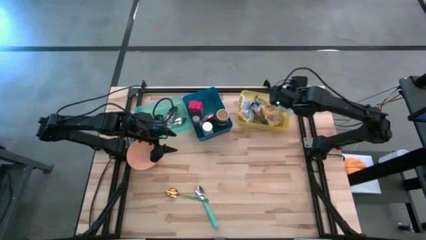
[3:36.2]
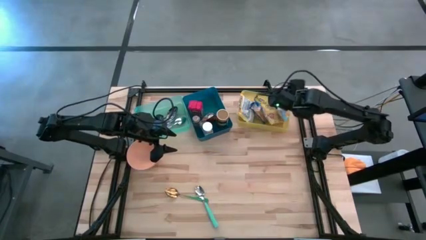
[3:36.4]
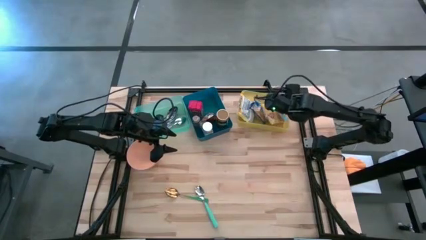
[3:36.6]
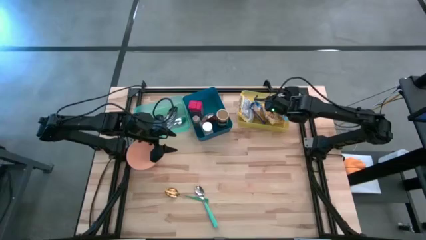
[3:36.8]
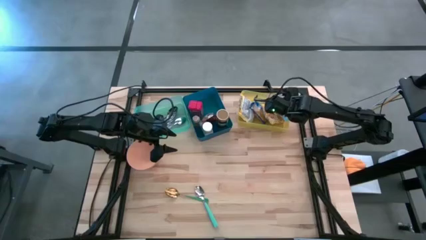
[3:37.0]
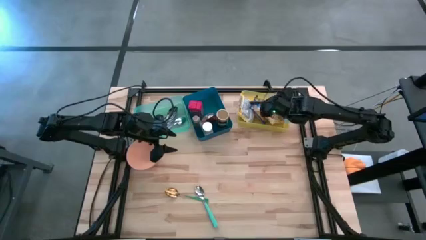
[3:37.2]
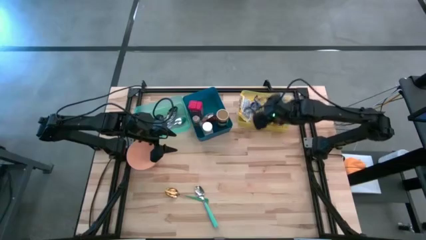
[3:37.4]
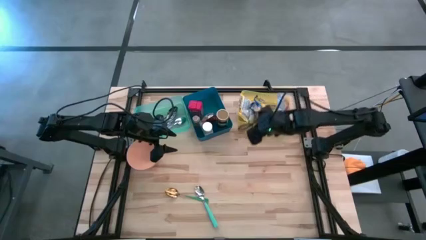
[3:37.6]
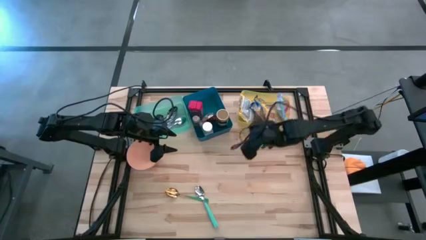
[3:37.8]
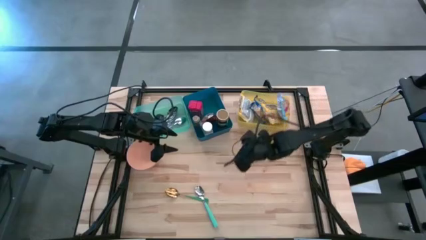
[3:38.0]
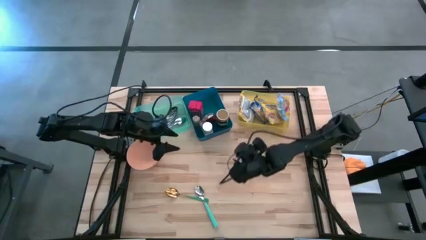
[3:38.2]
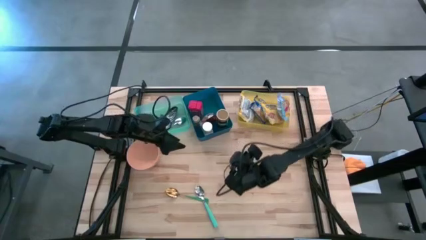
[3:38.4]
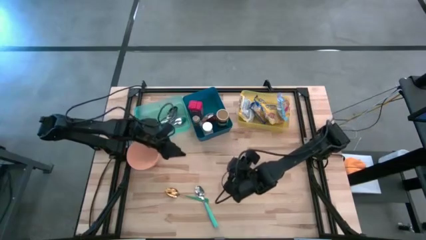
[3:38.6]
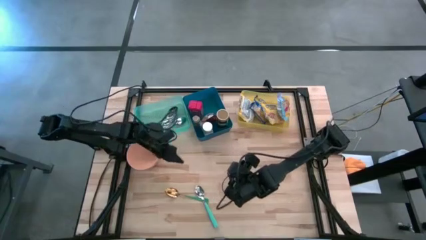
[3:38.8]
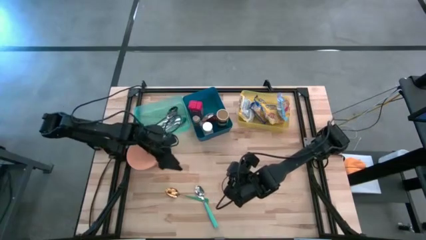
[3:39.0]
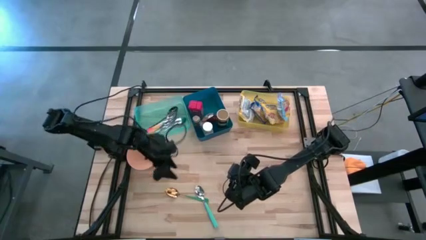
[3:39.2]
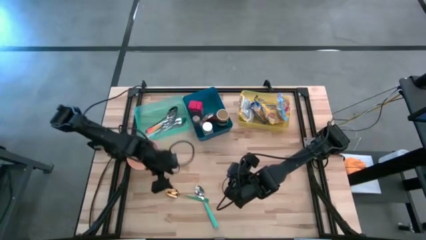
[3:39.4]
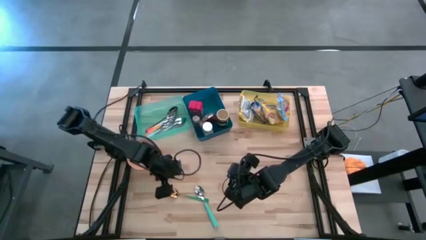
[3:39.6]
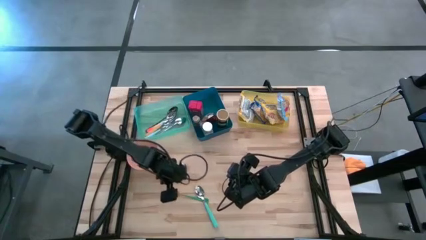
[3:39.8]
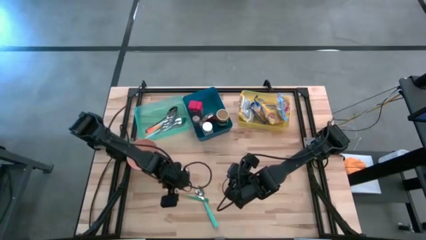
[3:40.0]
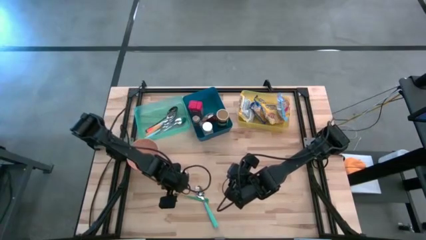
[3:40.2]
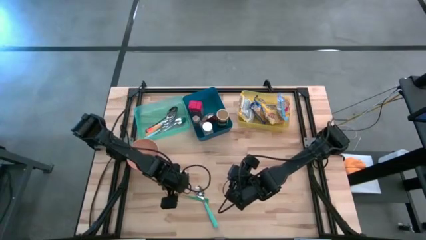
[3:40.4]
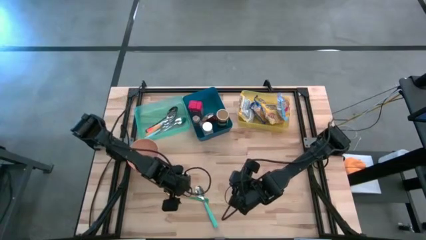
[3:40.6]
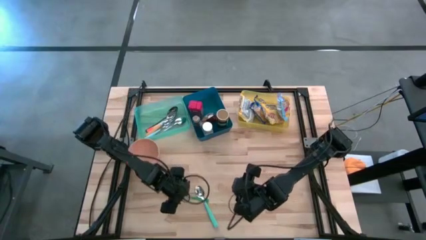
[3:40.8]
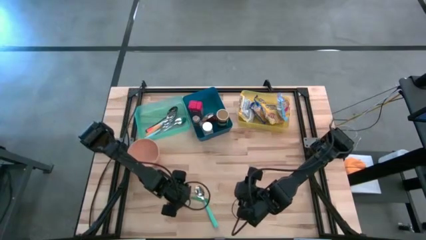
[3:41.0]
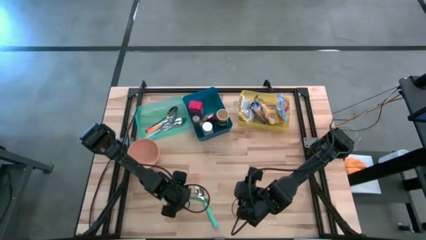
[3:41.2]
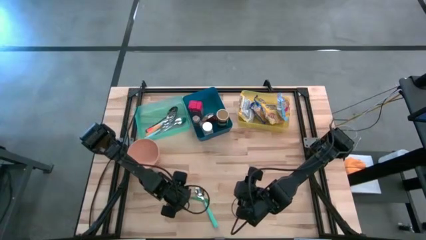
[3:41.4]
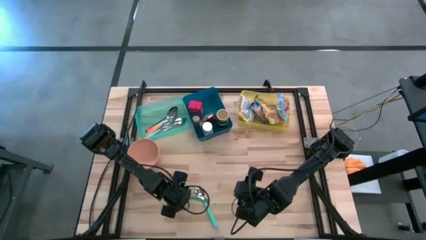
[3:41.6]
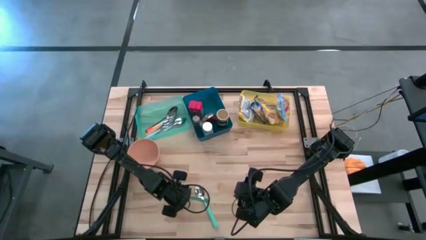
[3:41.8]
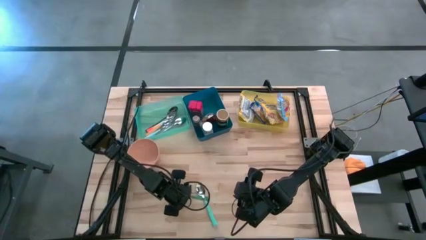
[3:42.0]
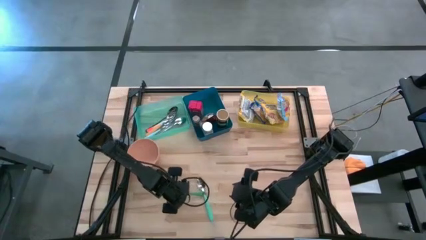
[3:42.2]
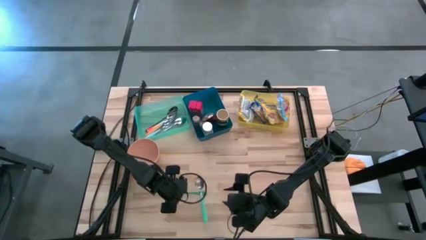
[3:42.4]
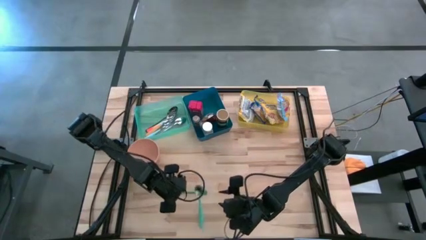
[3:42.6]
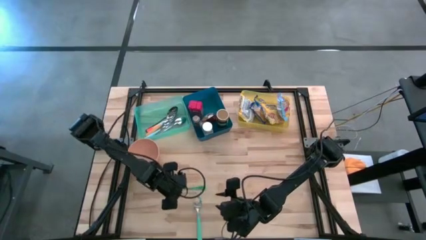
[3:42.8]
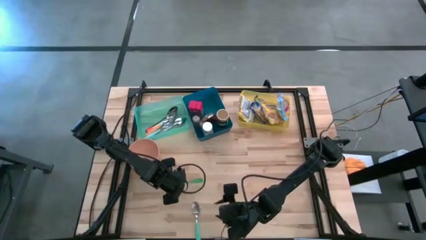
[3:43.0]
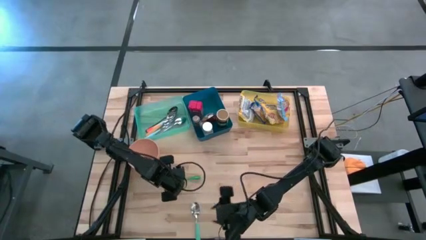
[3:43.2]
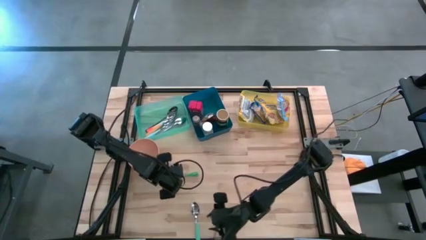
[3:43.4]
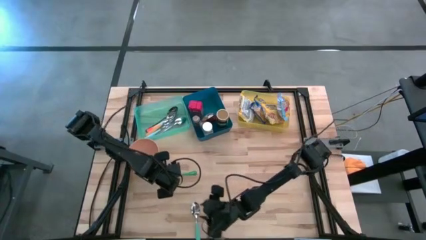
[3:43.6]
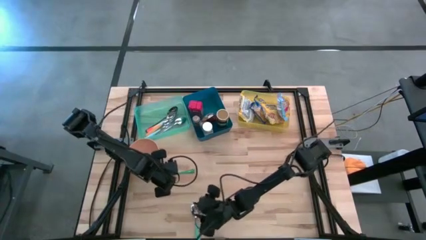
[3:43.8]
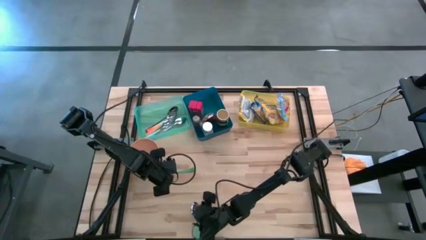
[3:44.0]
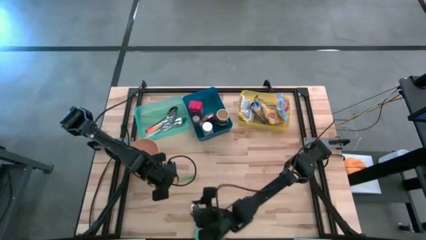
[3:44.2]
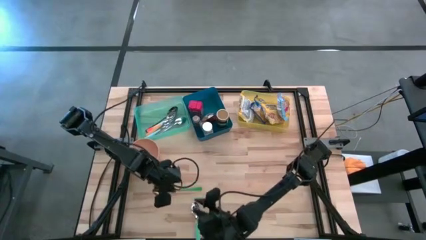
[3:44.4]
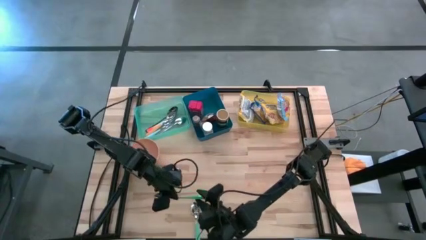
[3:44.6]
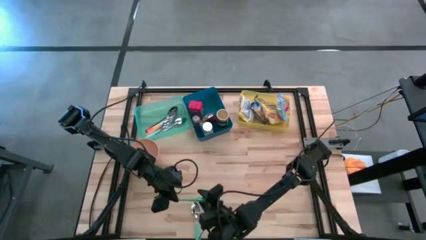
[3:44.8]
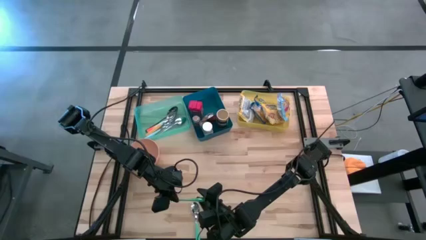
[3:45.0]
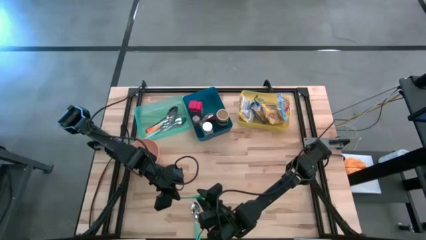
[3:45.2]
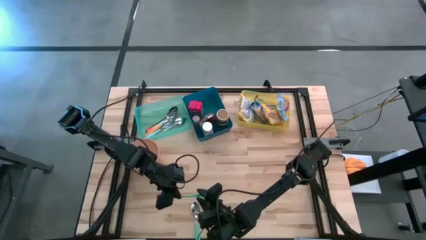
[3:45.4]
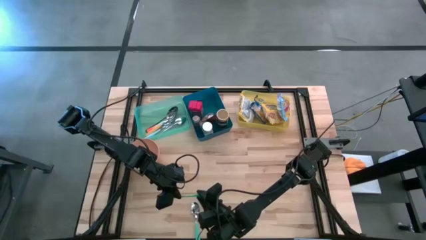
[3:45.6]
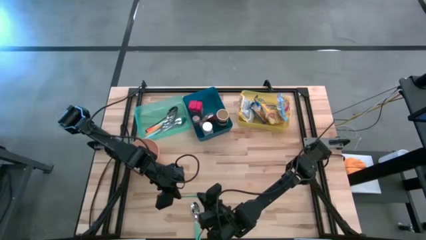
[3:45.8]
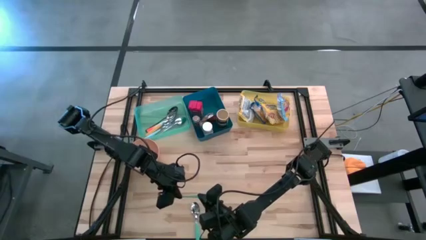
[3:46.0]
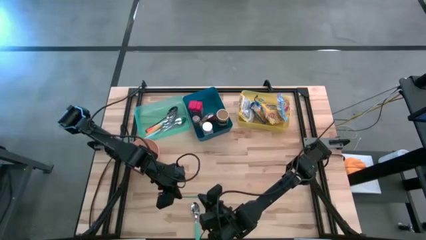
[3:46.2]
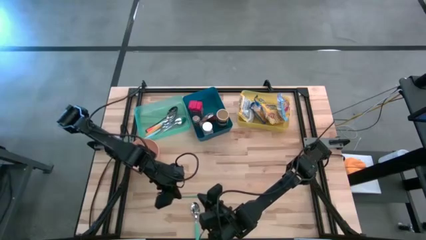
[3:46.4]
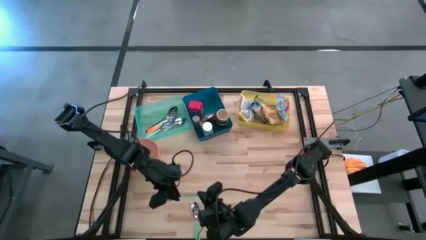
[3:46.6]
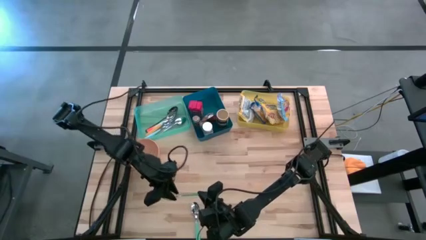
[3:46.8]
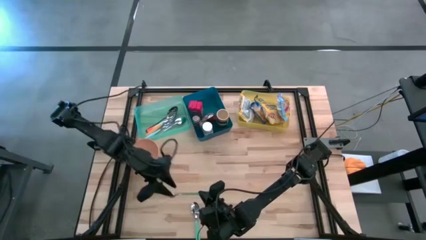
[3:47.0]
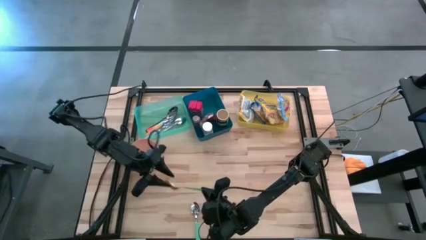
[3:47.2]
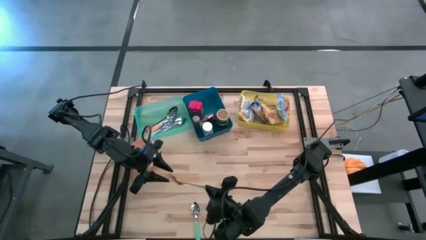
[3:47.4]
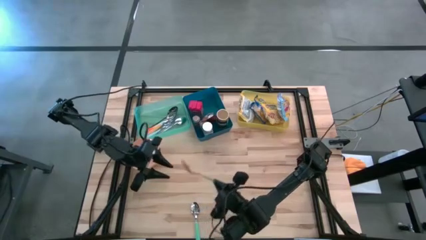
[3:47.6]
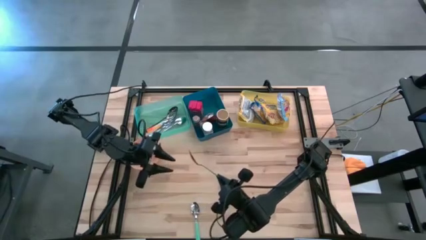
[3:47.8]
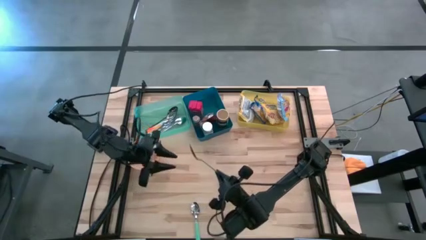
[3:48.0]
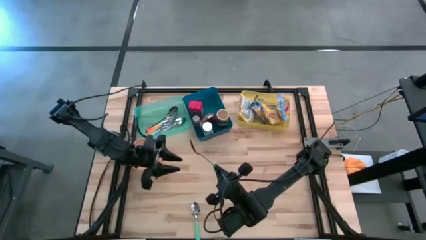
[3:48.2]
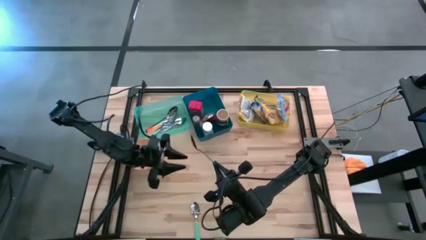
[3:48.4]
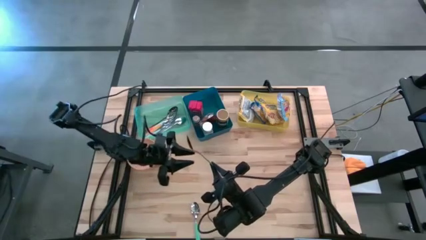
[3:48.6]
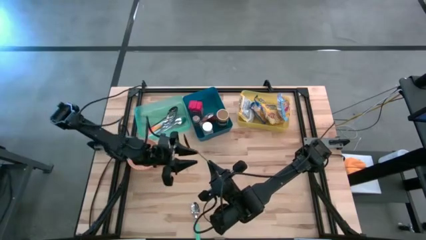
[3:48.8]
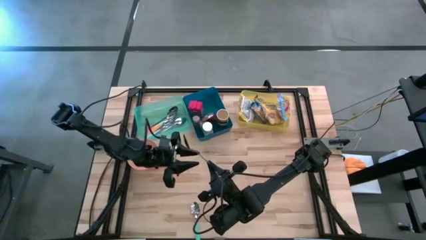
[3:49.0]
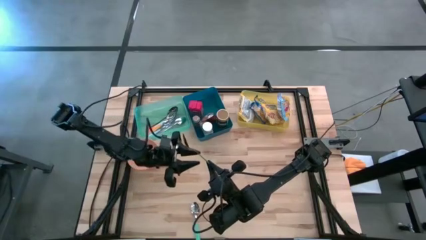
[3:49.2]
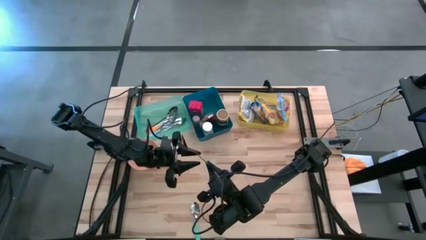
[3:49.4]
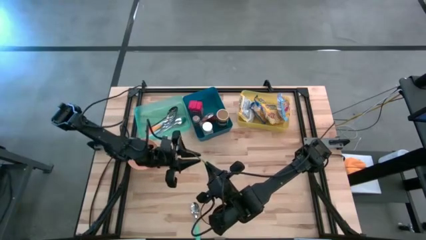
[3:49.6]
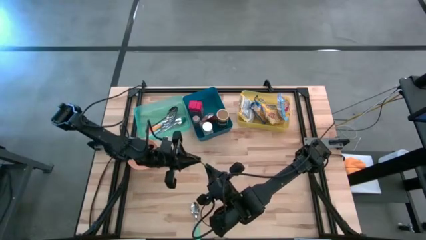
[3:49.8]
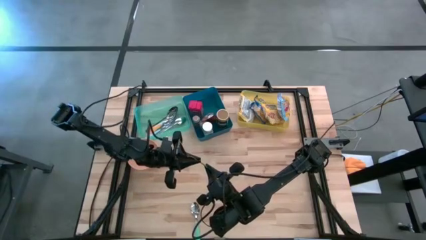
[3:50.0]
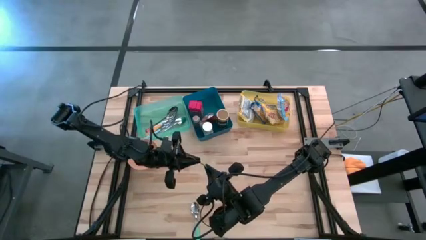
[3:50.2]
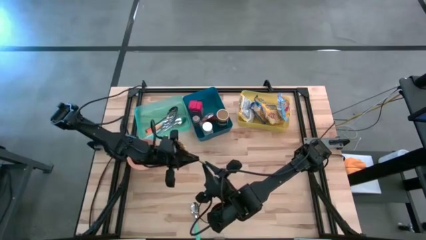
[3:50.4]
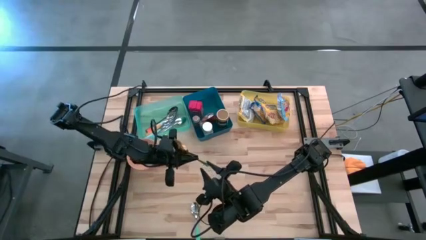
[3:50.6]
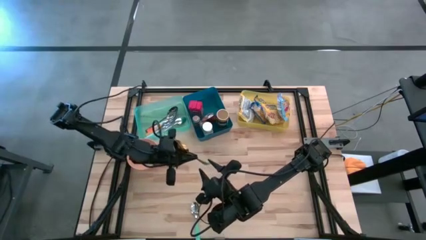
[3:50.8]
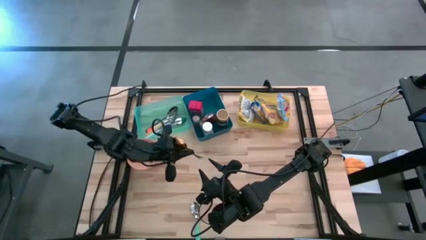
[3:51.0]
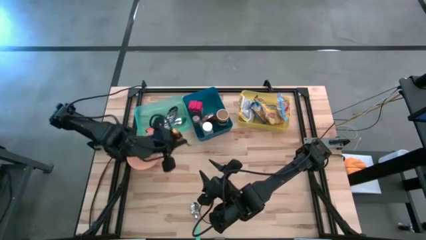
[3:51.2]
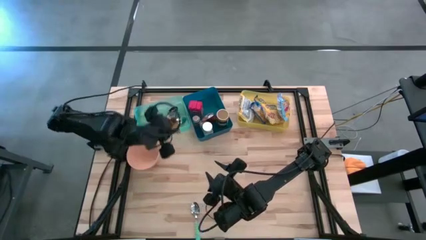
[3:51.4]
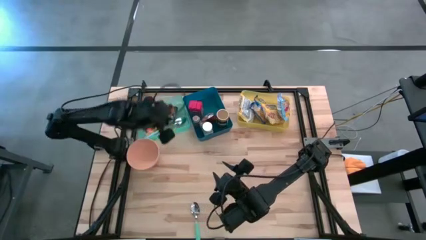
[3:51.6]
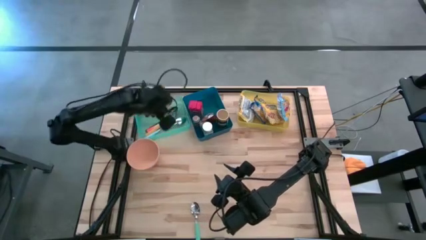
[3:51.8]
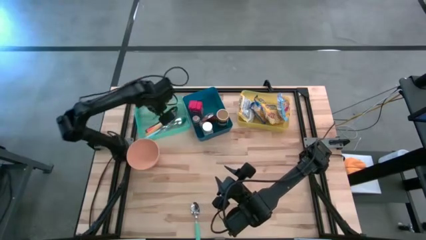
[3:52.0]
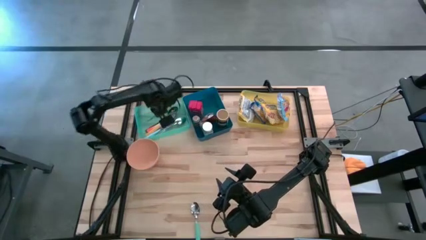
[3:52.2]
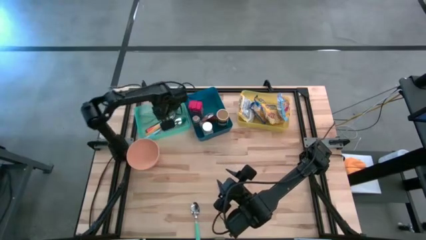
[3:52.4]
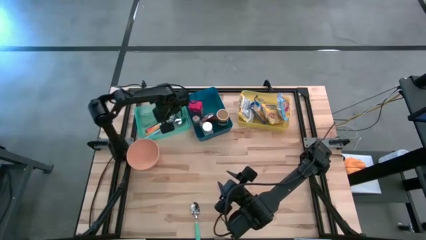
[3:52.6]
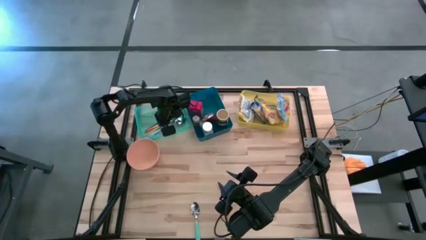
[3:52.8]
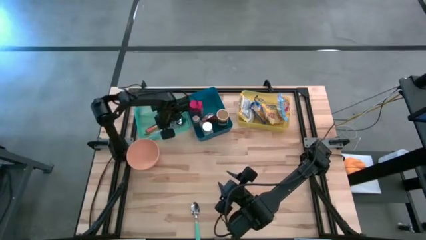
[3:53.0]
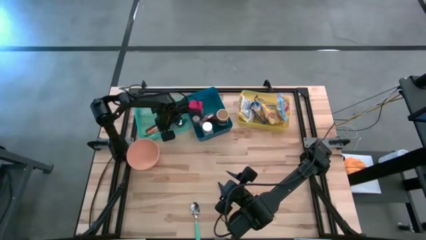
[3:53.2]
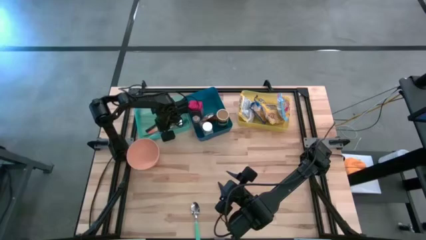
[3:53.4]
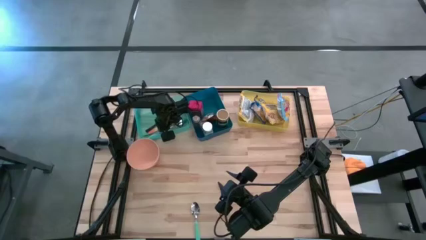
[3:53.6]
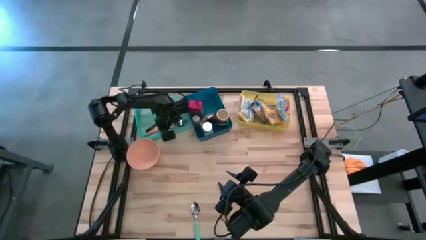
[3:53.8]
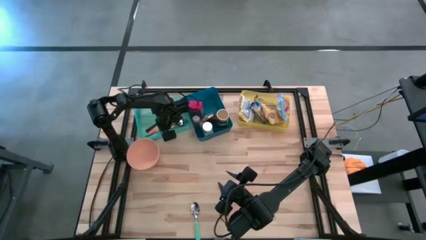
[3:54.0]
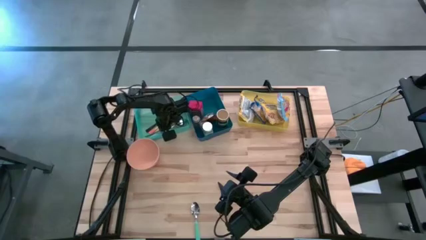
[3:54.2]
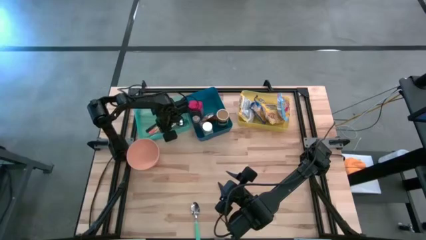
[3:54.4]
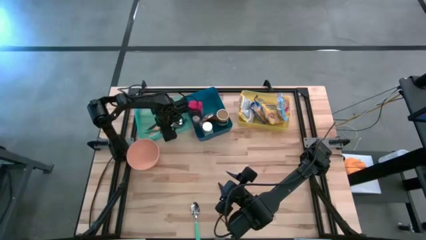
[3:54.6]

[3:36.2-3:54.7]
Put the gold spoon into the green bin
